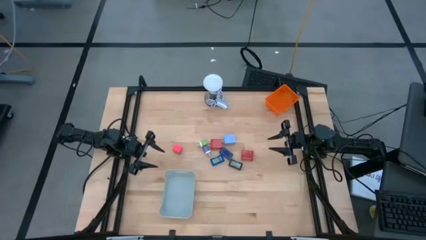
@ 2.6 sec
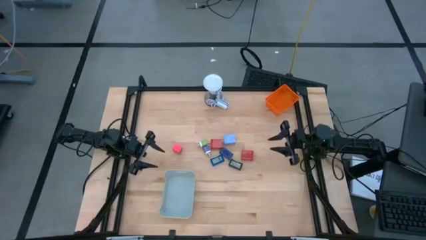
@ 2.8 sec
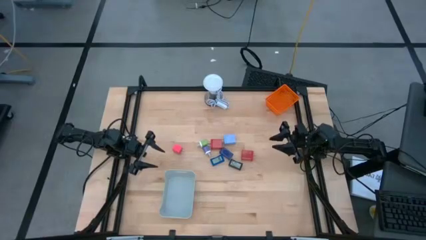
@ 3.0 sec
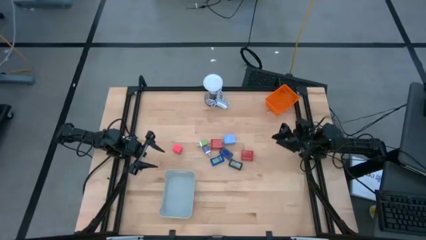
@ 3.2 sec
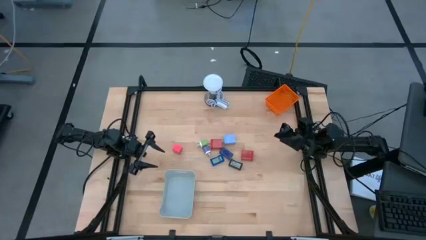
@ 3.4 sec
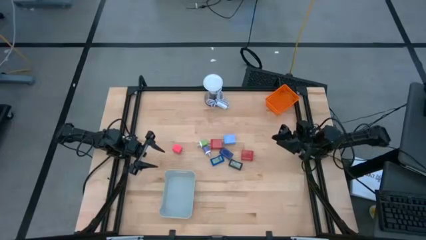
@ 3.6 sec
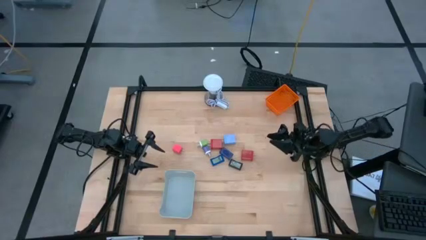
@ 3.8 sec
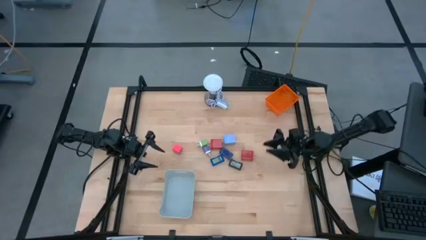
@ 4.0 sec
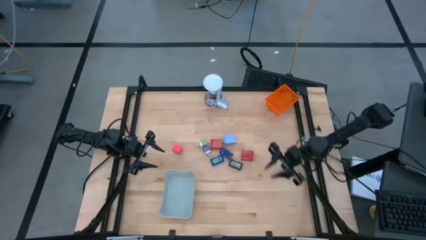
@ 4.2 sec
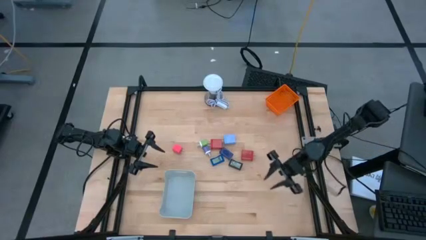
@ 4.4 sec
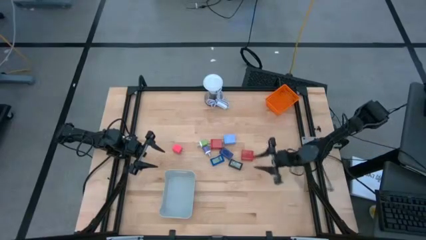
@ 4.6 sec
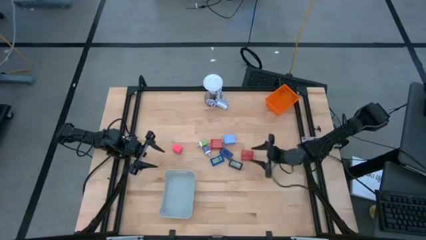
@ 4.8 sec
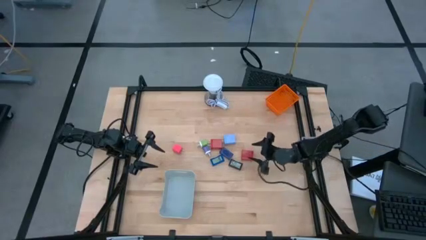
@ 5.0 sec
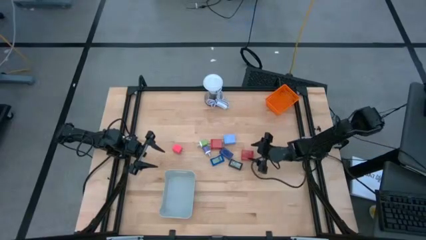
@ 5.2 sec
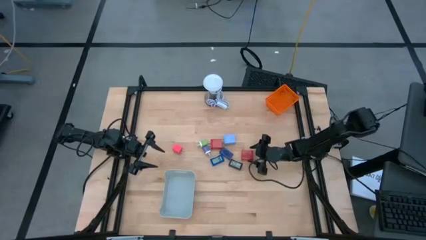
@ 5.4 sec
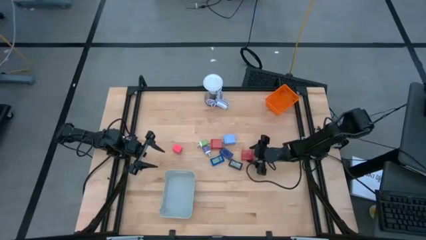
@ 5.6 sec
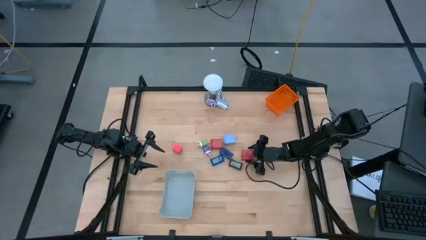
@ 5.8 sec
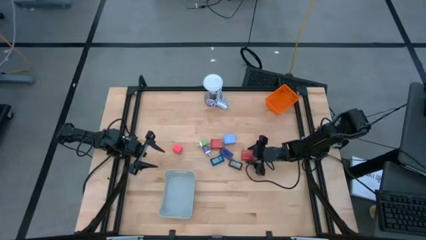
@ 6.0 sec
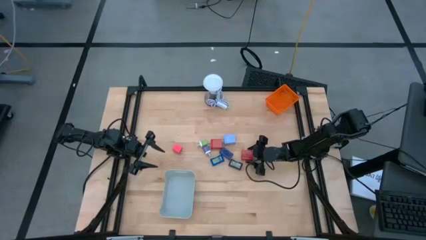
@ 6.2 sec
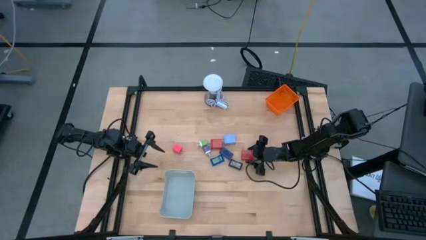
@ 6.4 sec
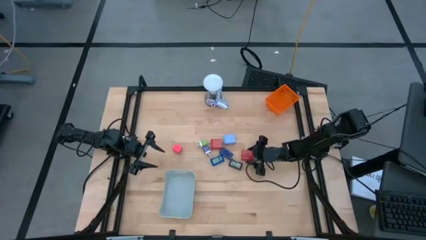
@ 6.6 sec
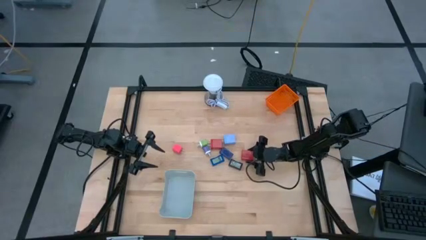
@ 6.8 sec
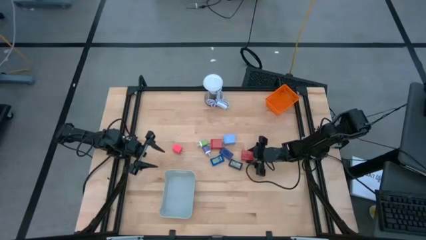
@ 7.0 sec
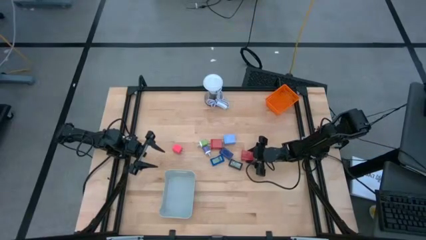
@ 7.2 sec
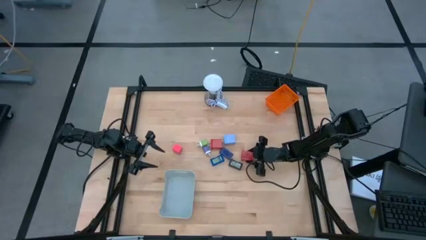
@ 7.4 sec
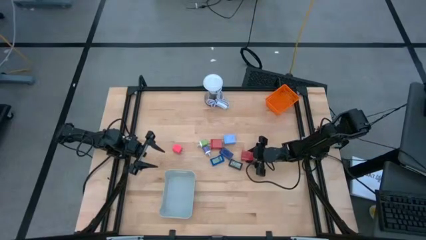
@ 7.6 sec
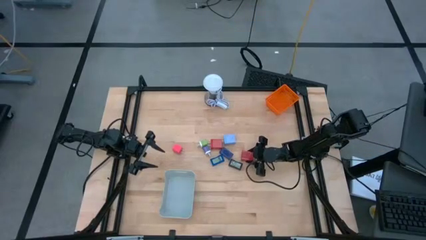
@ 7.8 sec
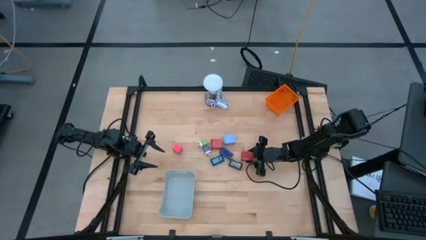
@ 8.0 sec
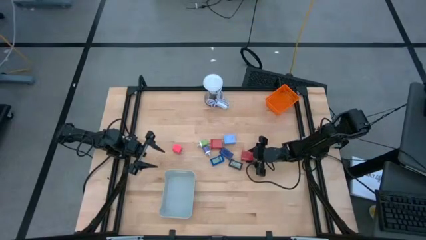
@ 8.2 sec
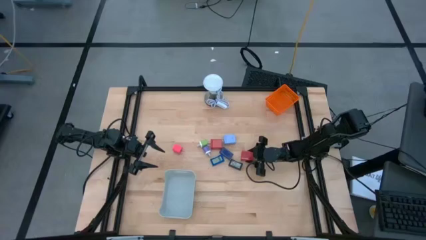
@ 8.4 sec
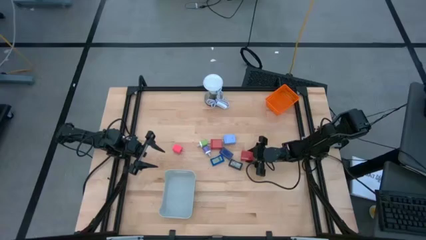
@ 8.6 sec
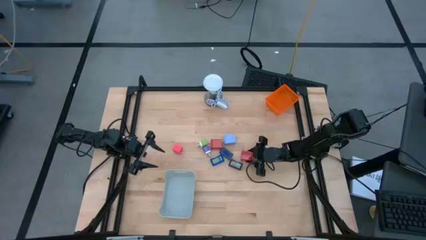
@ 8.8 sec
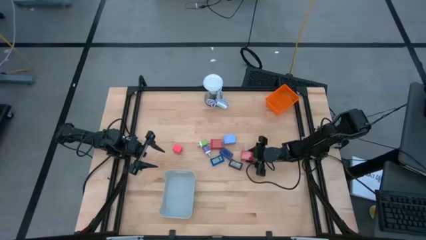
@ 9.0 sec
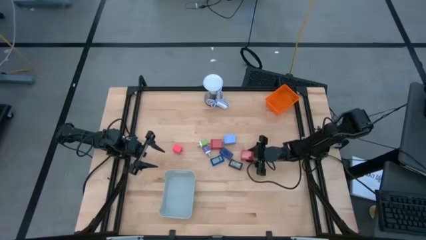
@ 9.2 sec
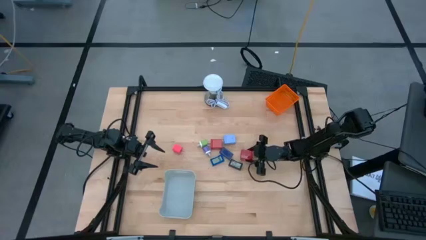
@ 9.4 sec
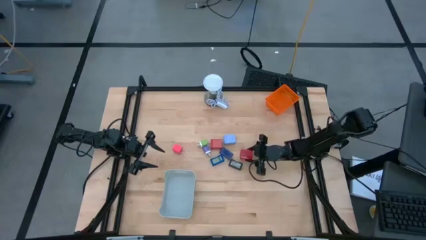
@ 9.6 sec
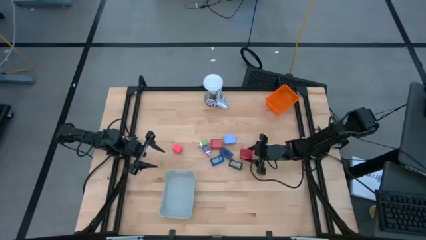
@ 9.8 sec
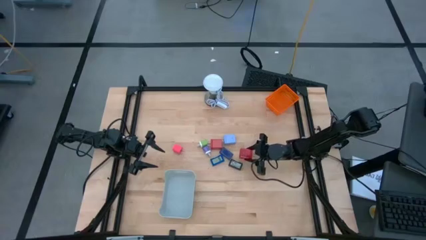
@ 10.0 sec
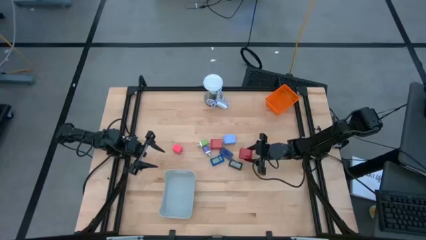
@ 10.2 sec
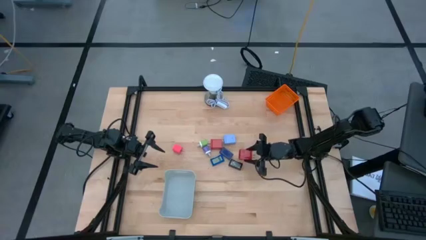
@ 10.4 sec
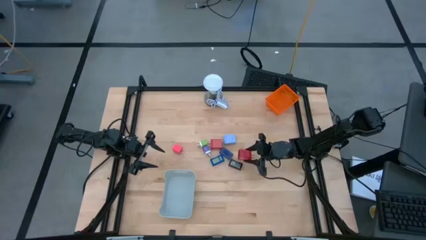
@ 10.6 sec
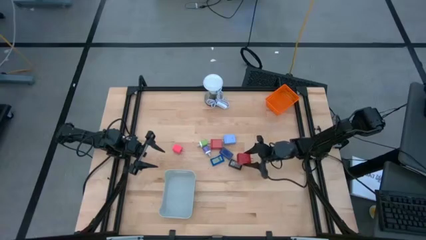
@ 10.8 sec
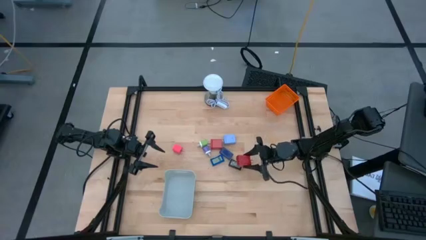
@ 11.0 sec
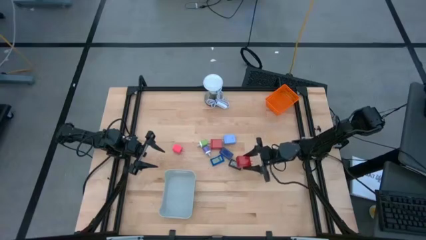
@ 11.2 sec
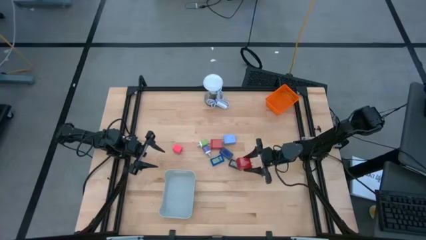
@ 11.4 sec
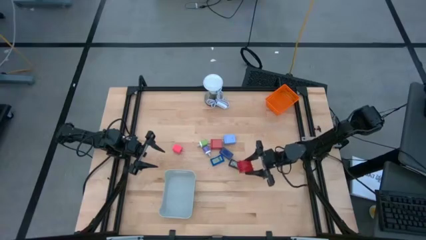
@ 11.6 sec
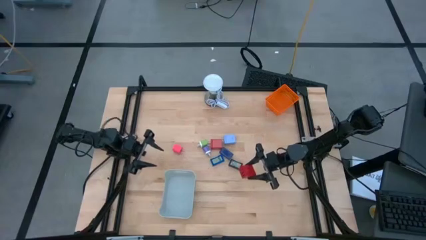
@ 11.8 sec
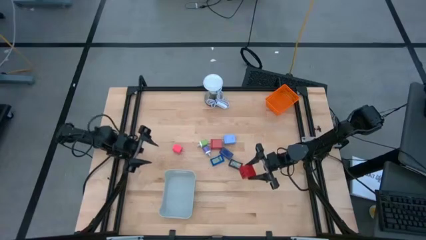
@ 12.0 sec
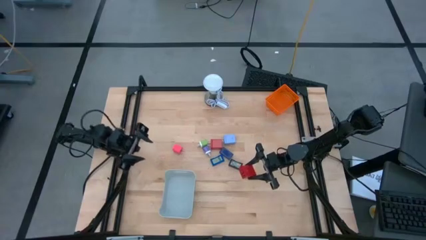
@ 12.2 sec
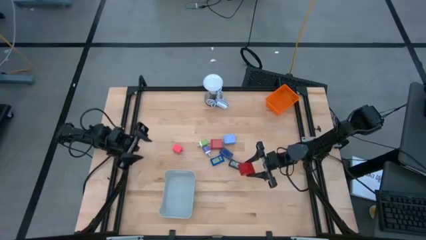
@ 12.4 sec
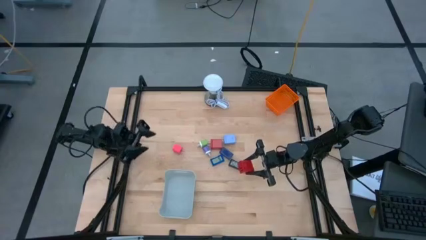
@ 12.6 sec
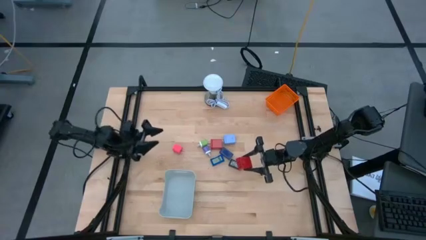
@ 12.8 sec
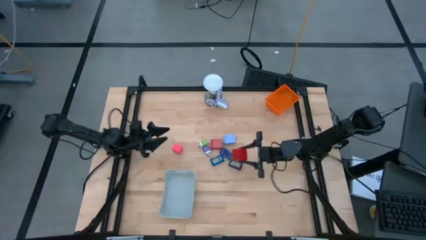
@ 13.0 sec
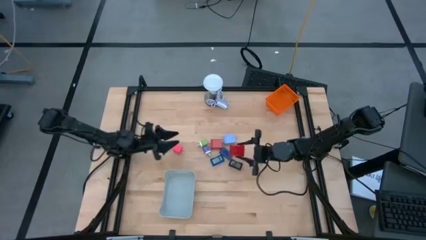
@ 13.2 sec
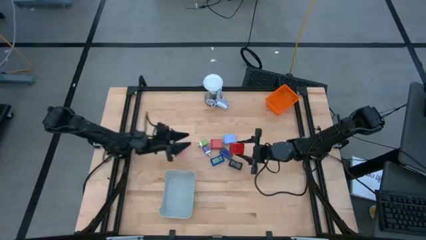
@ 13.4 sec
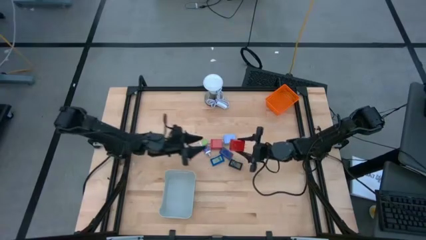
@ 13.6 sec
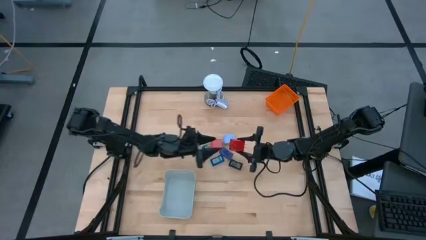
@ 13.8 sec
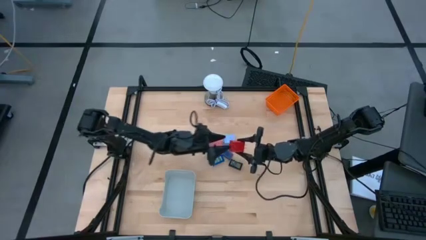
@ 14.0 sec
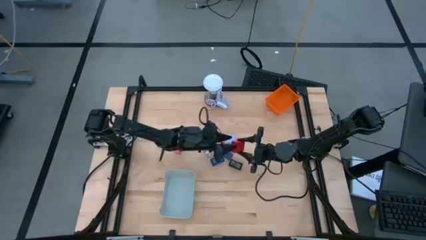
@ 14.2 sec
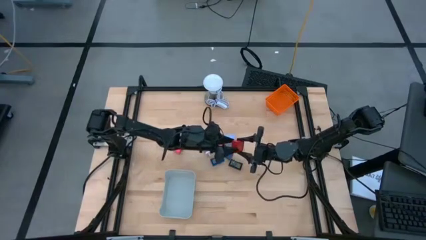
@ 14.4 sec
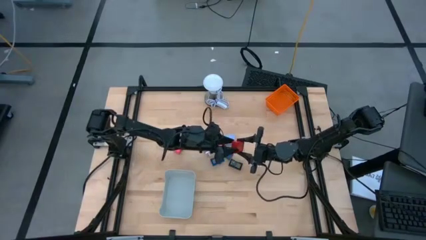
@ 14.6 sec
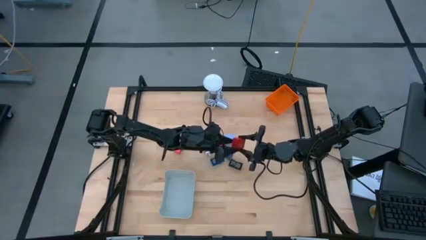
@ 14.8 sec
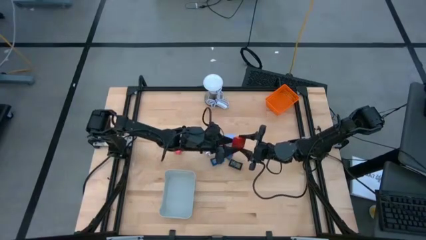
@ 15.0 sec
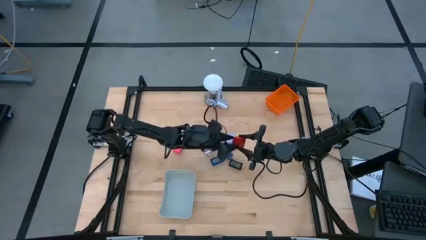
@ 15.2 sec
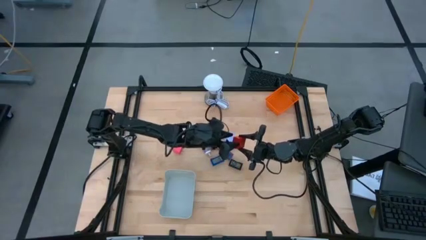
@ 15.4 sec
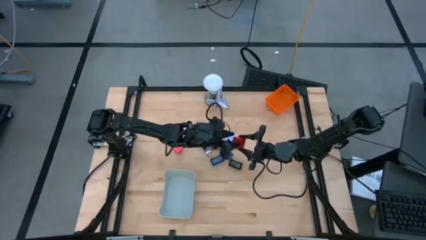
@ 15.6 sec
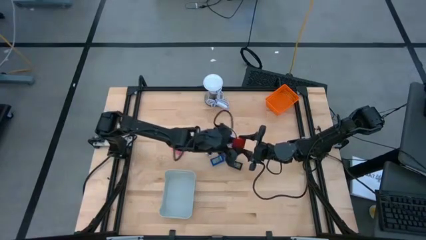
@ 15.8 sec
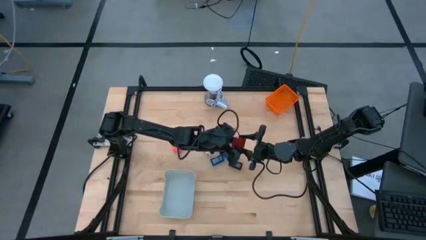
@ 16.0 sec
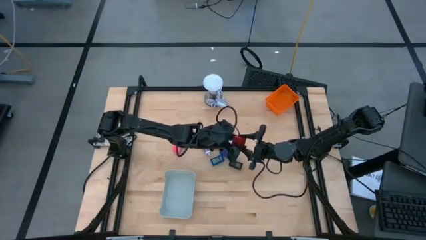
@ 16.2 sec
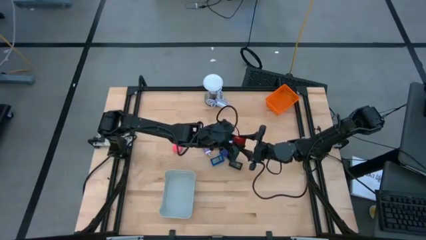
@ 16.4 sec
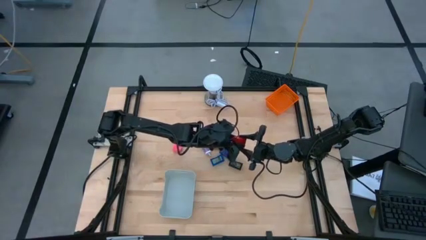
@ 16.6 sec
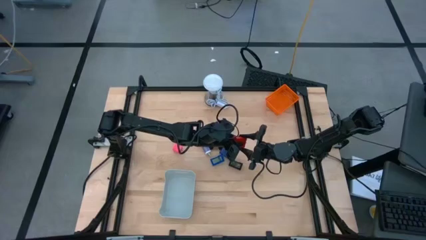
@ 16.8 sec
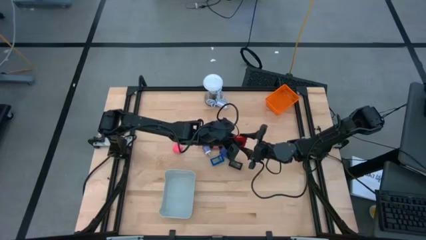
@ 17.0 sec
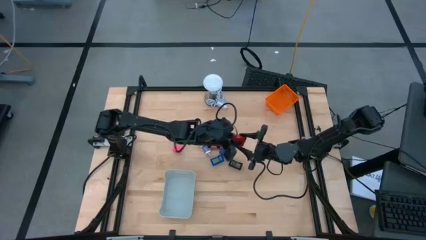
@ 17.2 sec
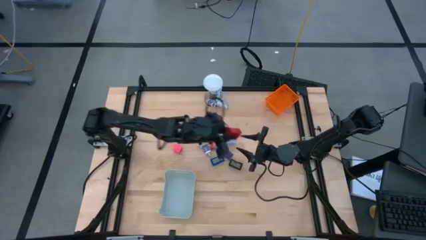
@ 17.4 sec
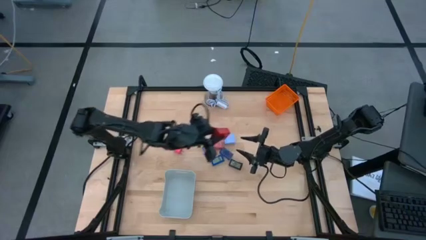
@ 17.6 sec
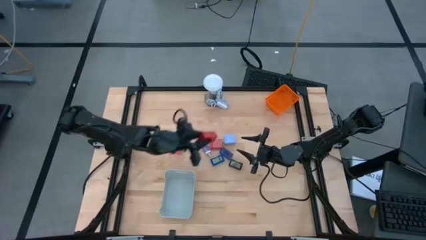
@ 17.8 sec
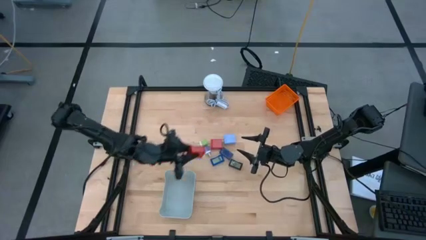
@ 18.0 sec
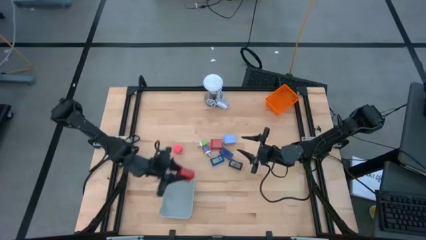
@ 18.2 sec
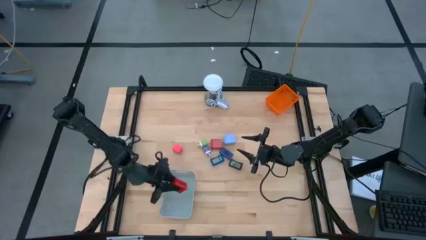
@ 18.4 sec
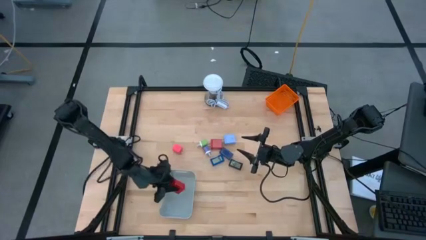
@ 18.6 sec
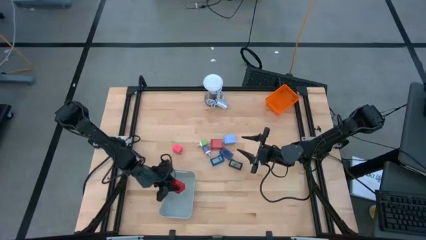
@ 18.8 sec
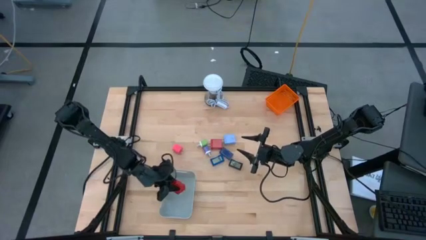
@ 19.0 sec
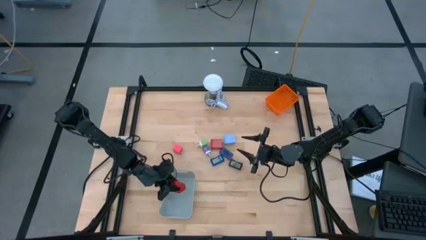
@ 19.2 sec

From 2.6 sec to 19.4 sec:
Task: Pick & Place Office items
Put the bottom red charger adapter into the gray bin
